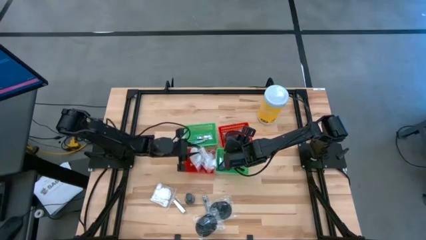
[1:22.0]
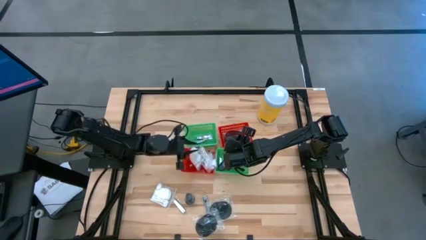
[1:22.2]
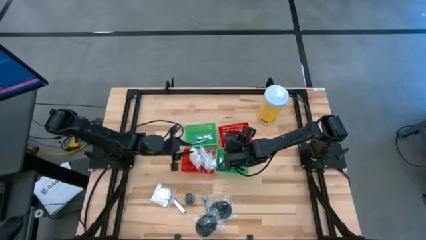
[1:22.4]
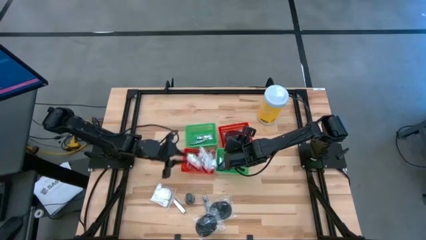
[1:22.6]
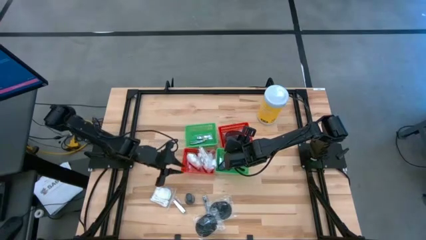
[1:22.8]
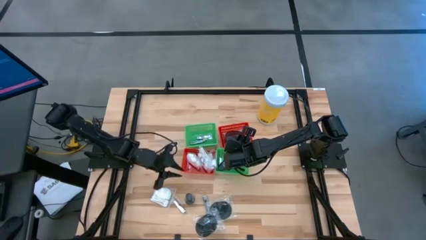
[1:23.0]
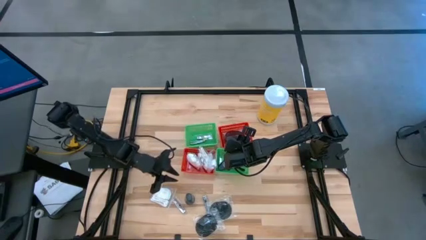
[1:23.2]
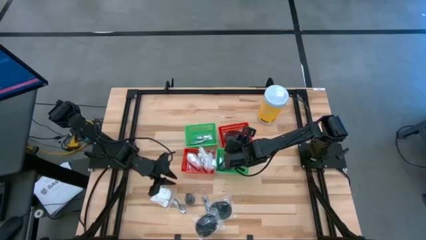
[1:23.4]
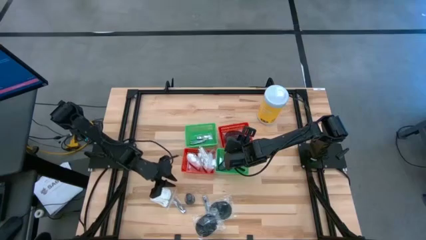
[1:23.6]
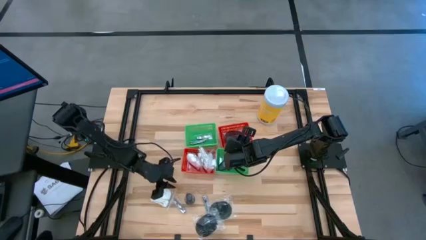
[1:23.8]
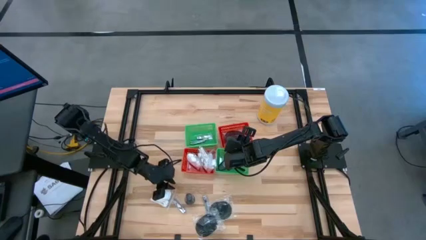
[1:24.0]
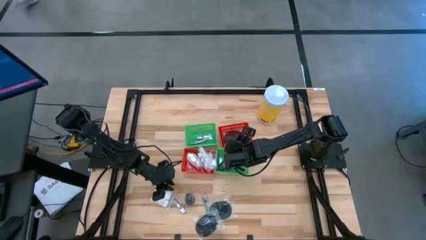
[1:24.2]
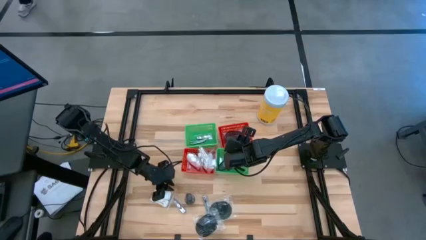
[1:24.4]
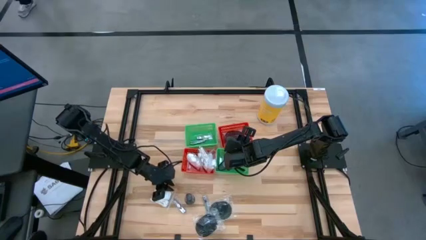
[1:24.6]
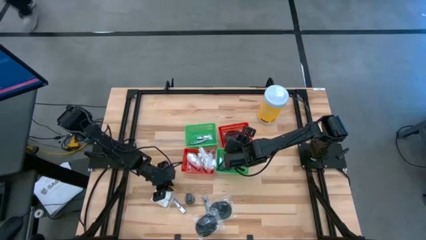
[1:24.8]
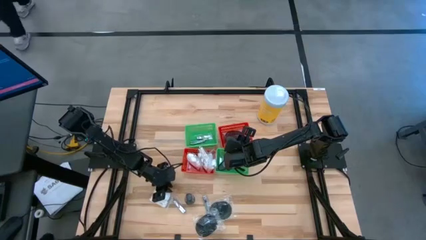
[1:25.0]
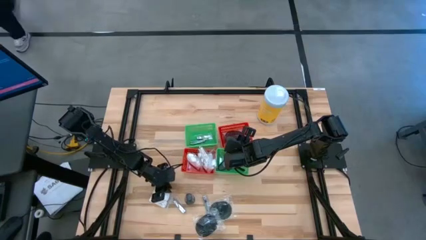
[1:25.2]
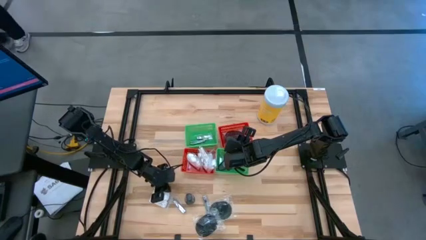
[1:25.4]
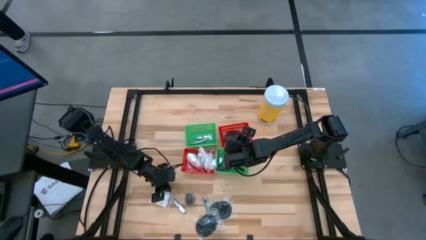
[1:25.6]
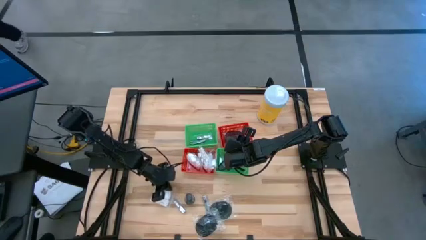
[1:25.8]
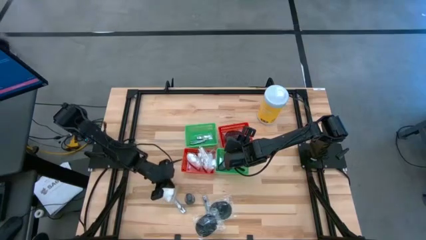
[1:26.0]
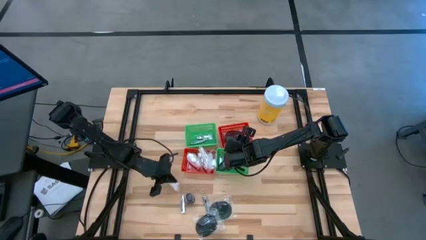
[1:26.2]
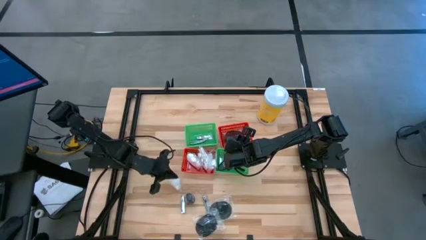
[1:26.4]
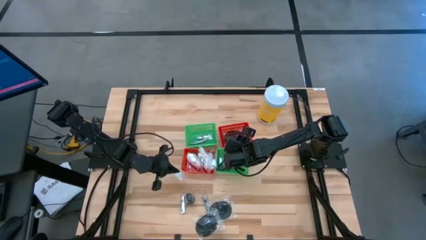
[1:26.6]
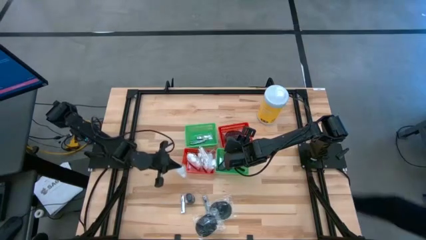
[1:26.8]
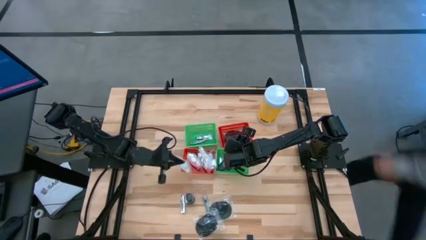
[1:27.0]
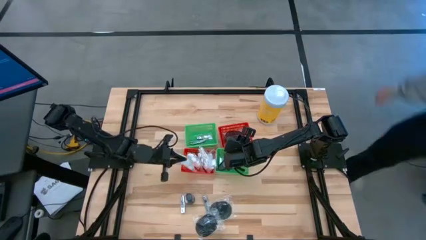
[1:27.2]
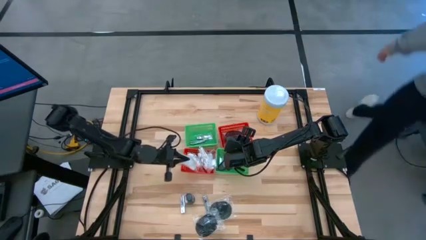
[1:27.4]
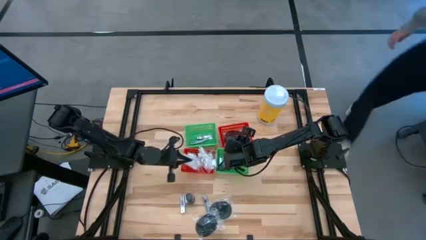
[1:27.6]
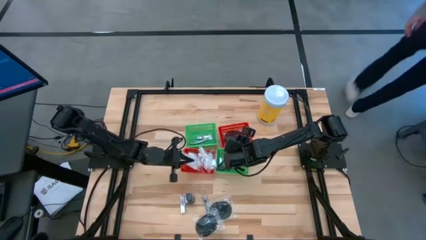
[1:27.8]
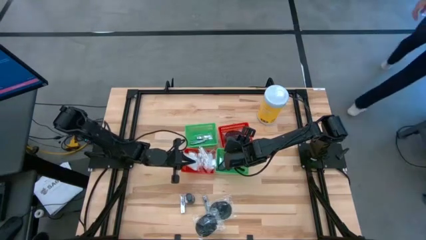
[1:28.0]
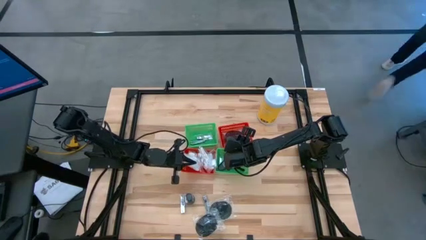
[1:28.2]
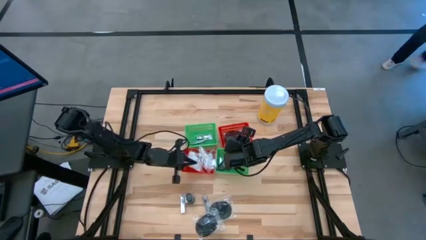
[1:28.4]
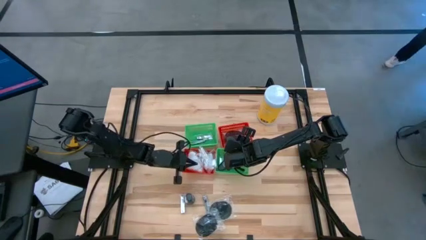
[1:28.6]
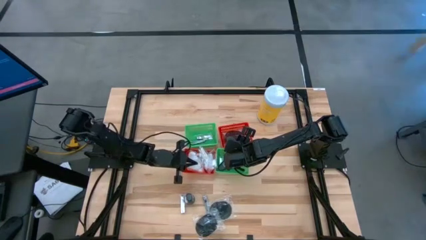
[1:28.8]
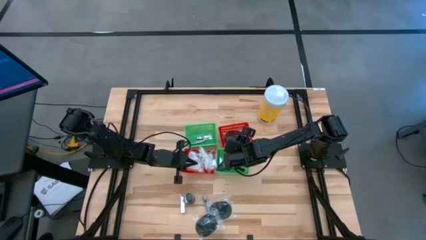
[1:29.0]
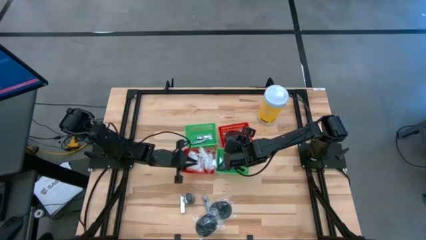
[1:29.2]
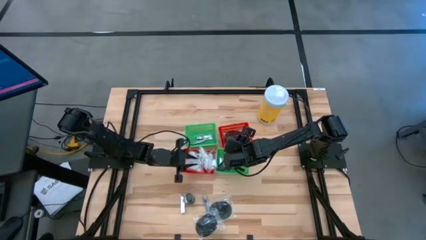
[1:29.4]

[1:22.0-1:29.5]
Task: Pick & Place Travel size toiletries
Put the white cotton pack into the left red basket

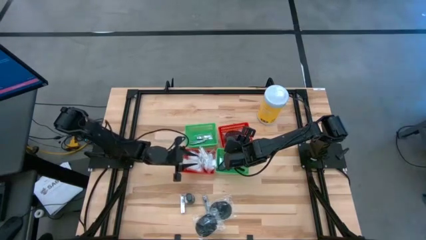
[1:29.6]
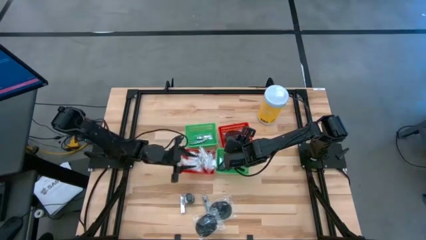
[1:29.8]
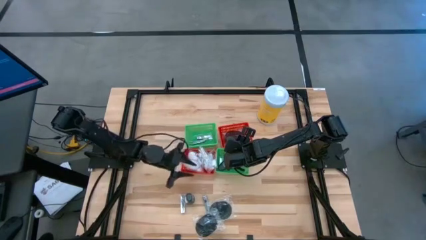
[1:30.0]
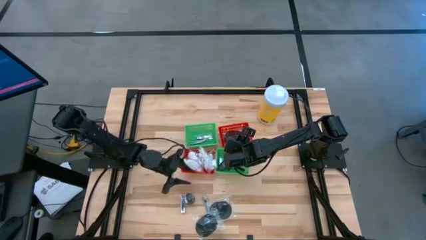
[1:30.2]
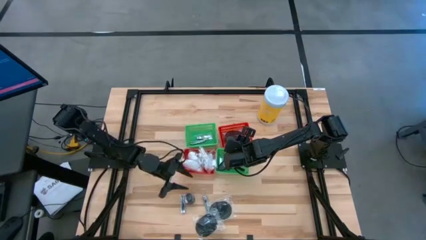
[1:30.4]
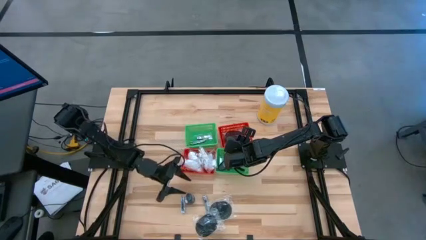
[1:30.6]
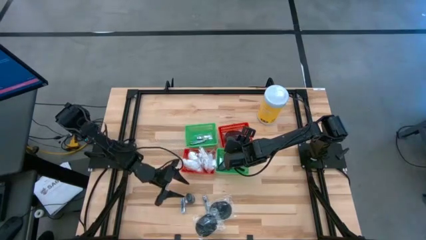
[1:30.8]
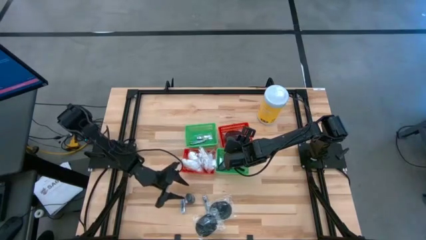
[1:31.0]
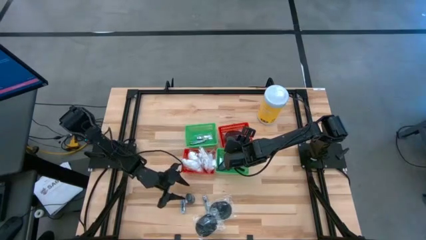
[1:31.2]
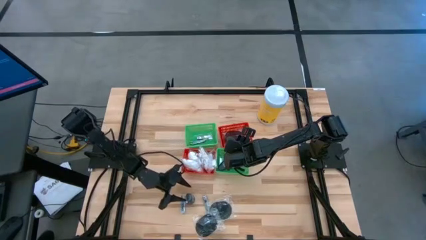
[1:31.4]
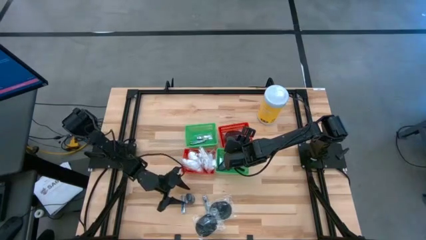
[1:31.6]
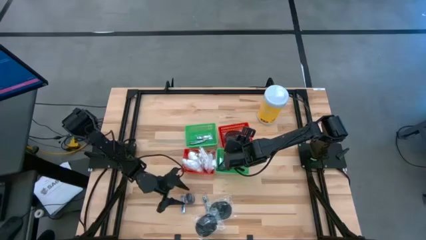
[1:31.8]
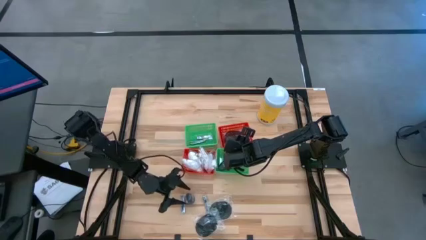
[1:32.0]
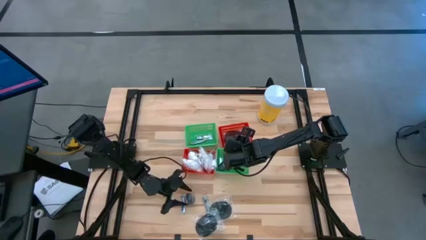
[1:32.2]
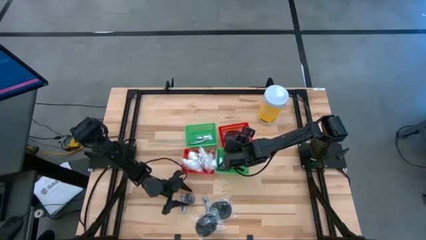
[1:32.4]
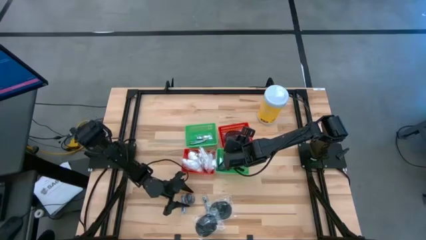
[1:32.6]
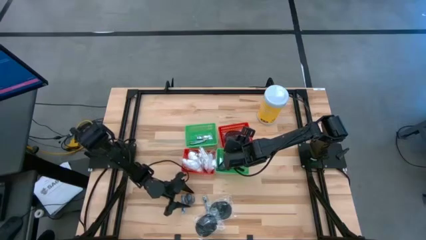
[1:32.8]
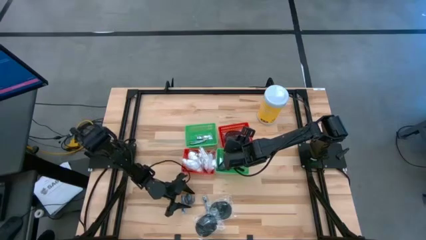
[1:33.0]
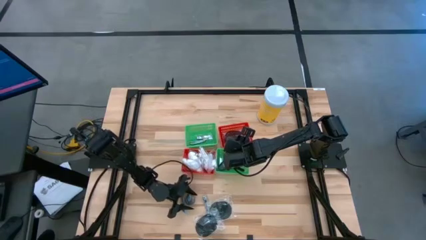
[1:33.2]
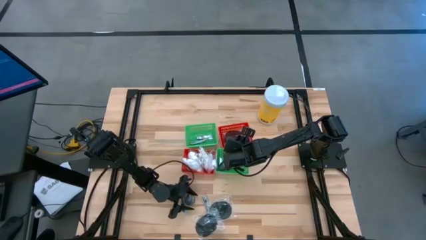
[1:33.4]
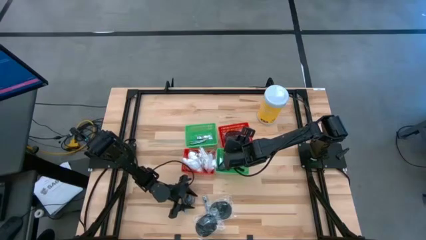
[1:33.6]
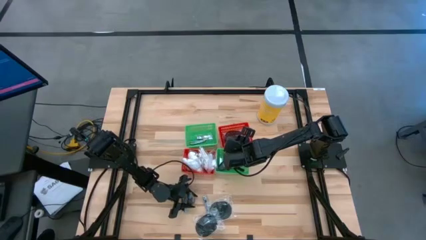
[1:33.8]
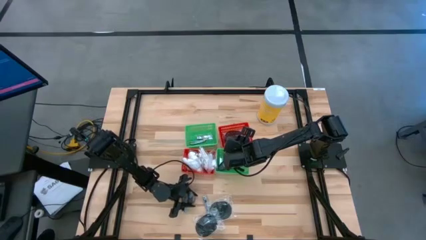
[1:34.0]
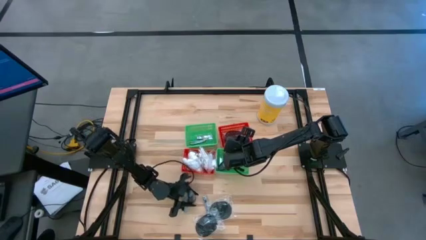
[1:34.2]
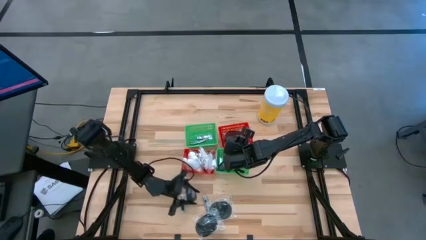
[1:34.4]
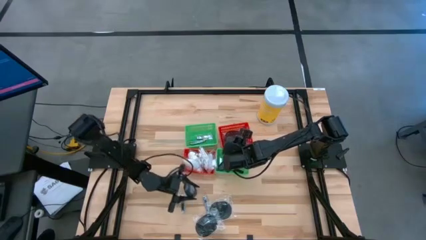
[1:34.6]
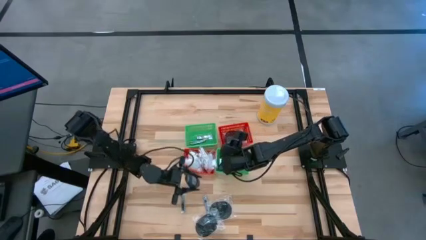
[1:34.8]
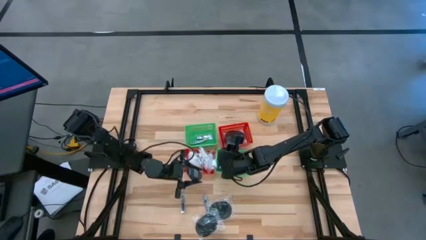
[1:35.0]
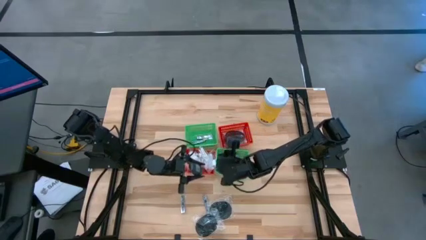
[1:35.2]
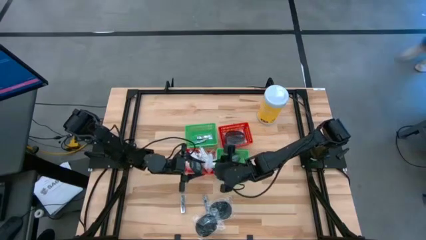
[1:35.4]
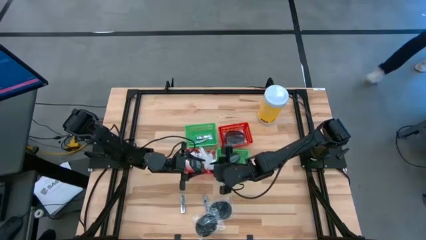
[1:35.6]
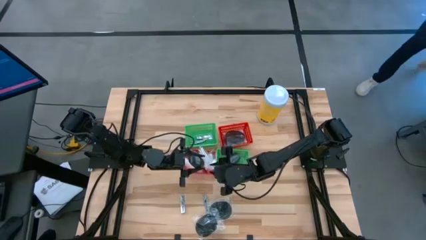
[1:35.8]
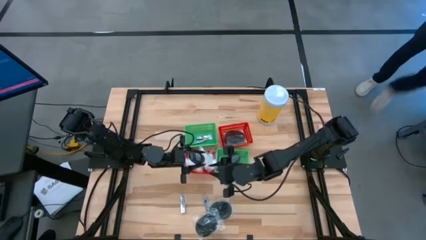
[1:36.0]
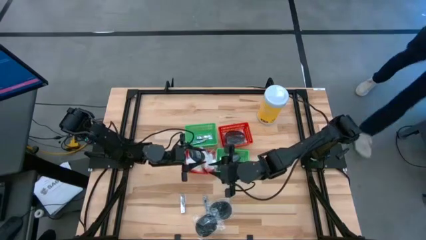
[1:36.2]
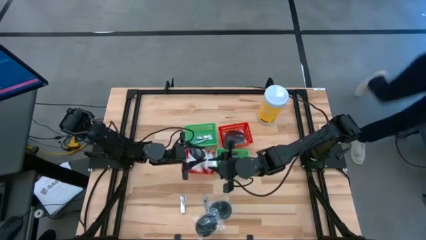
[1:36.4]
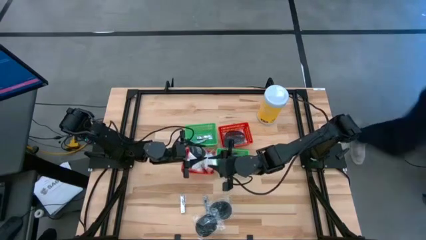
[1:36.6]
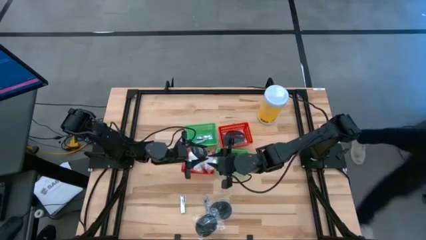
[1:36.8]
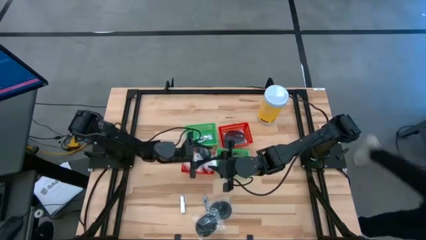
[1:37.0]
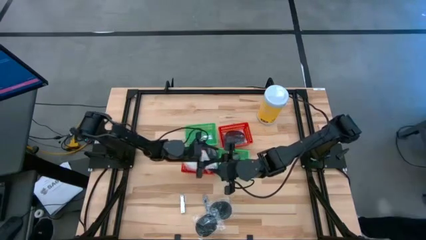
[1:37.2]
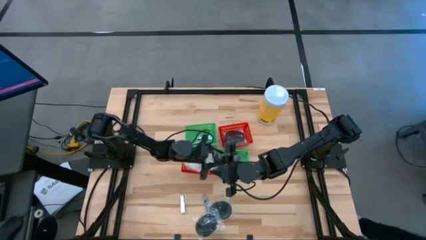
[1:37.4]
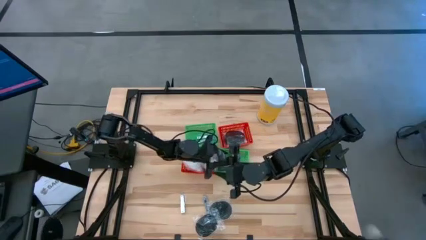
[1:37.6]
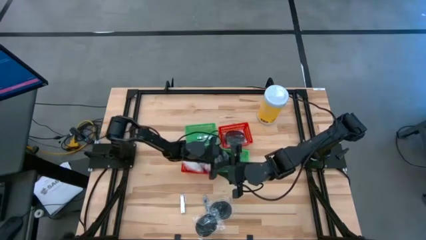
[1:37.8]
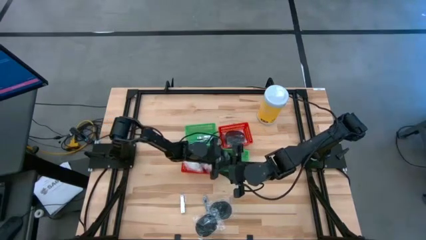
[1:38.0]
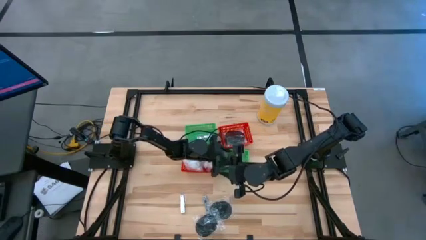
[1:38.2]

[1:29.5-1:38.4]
Put the dark gray deodorant into the right green basket

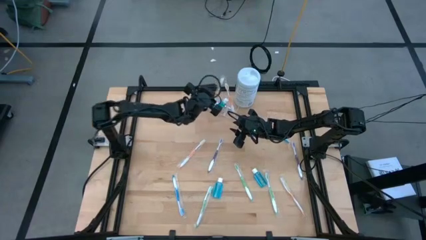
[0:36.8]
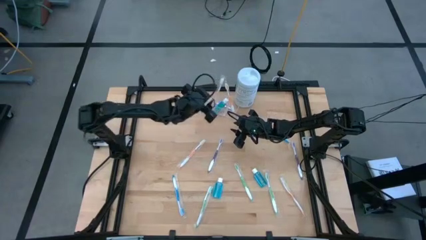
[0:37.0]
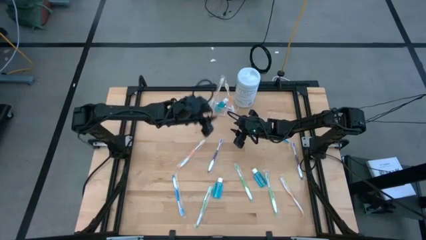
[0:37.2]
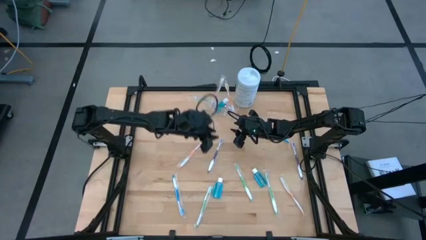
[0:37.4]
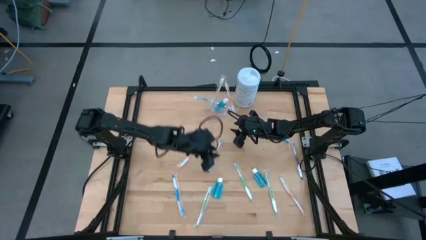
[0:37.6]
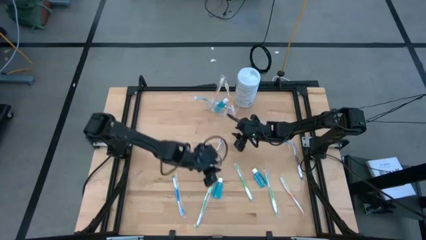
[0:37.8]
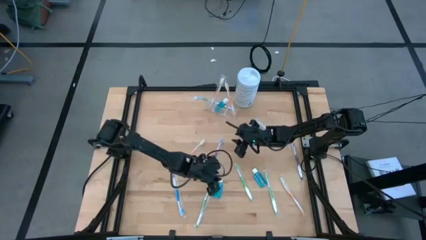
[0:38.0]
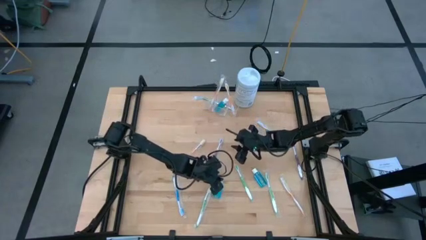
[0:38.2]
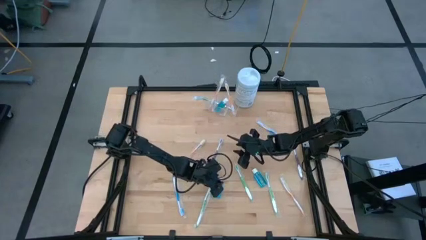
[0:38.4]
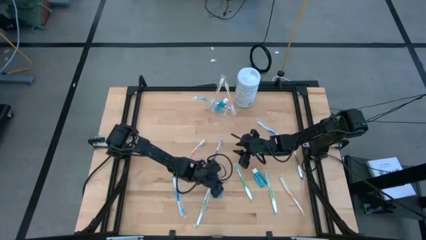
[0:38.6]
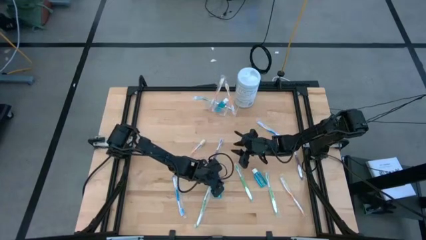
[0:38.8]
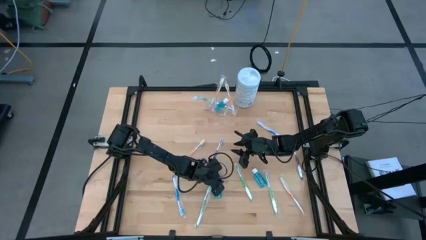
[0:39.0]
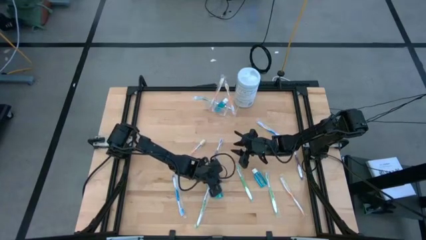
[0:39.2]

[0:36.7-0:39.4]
Task: Pick & Place toothbrushing station
Put the blue mouthwash into the transparent organizer
